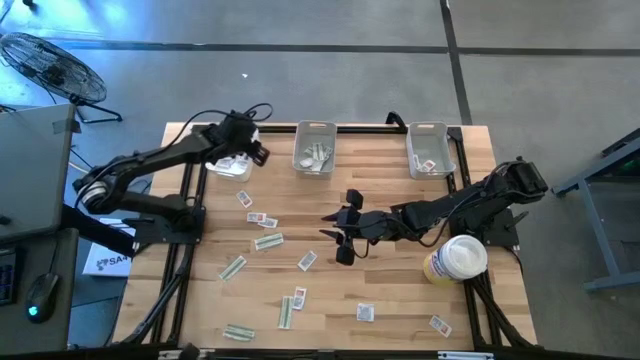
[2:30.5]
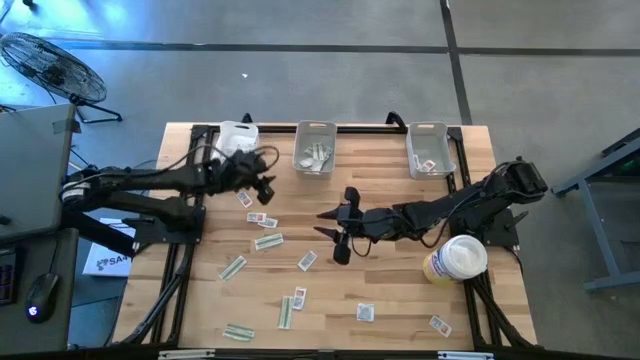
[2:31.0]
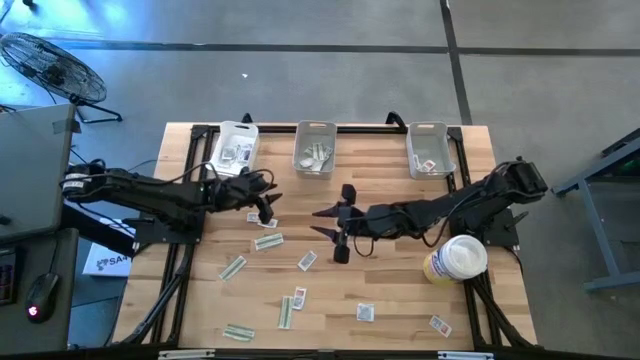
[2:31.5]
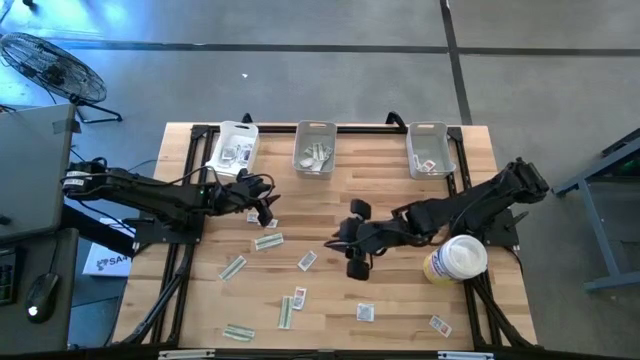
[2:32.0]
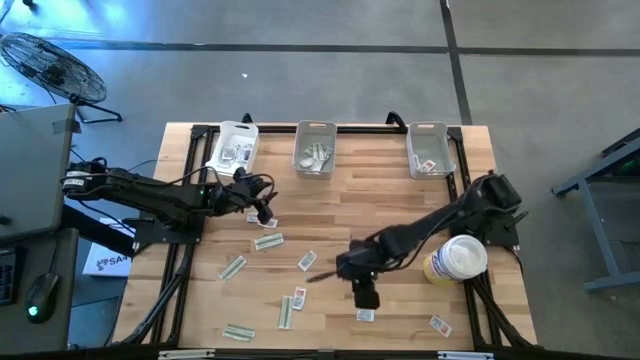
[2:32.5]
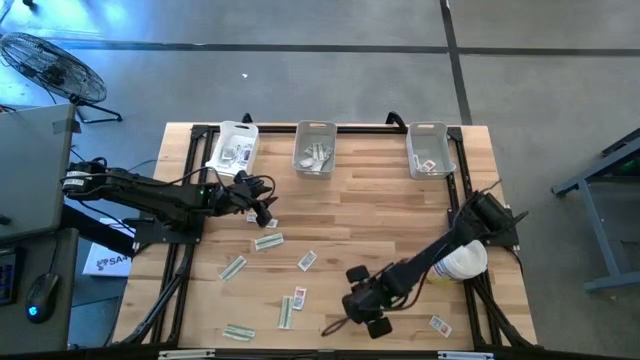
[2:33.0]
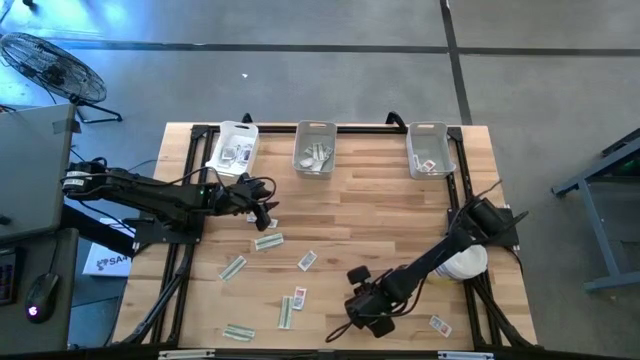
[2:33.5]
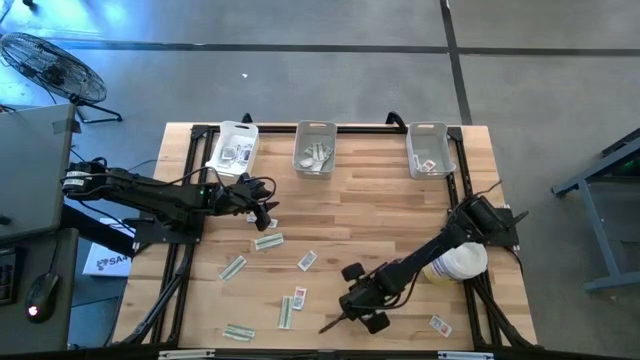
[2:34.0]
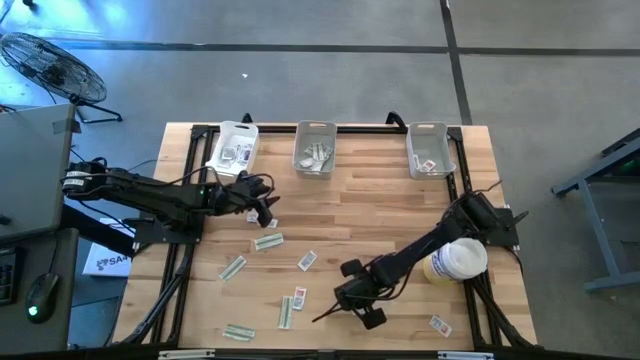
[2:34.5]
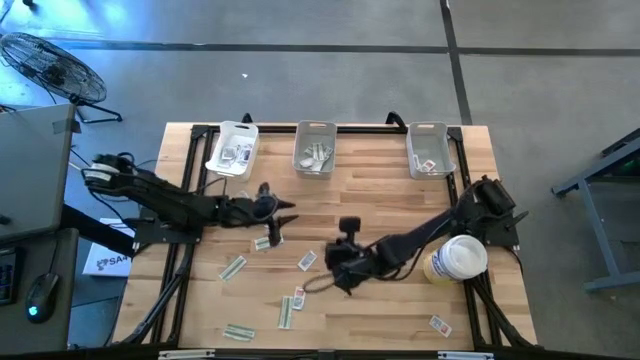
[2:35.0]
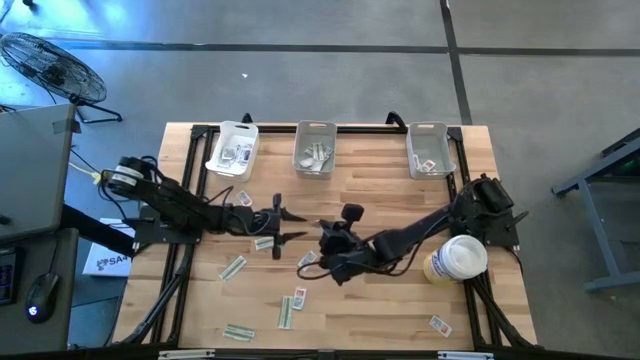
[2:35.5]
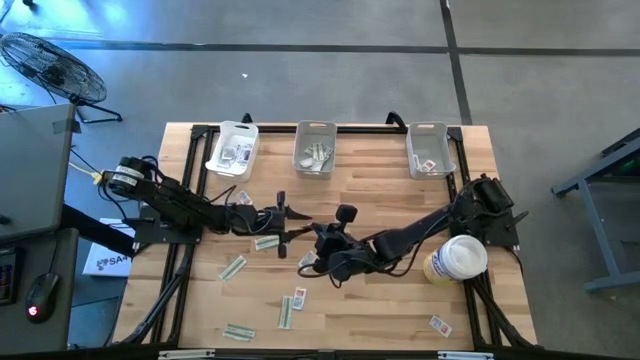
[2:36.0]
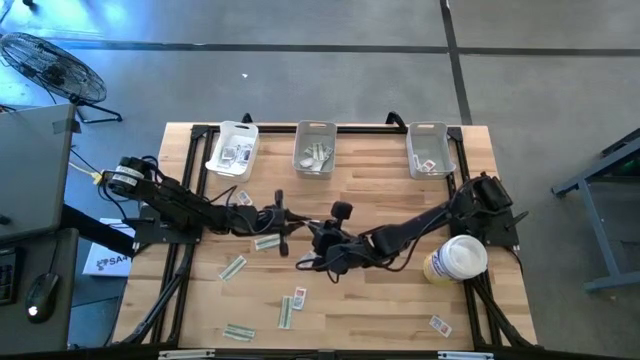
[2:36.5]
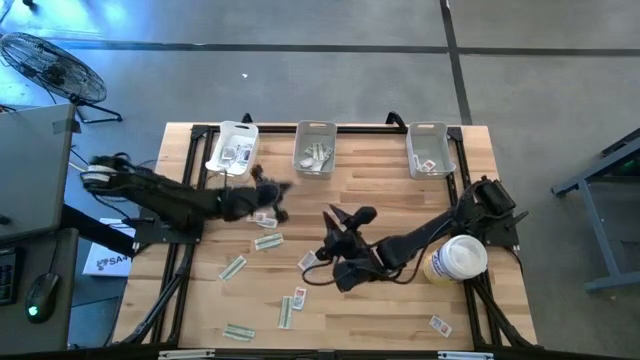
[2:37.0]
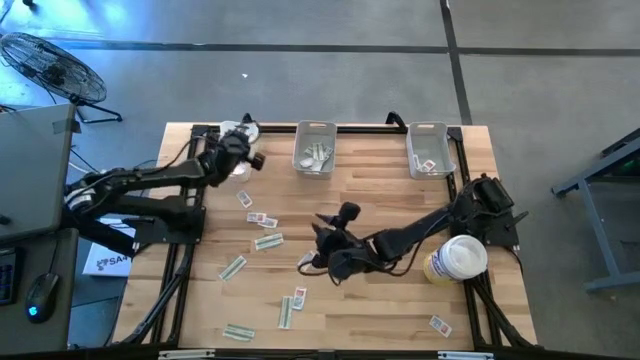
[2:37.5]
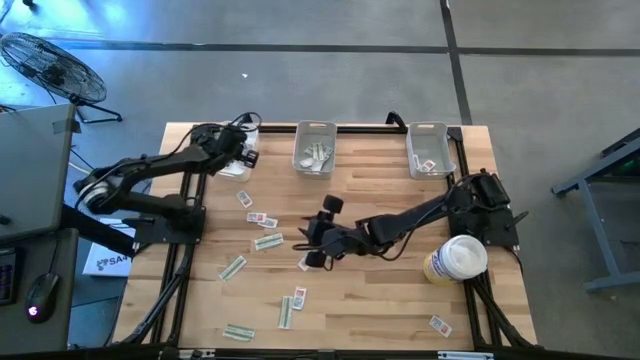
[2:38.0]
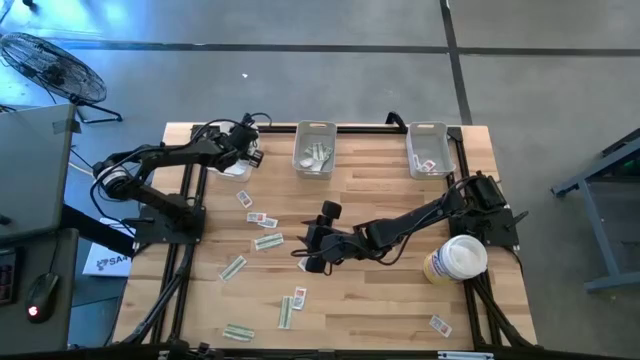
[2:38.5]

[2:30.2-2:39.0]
Task: Pick & Place First Aid Supplies
Put the blue pad into the white bin

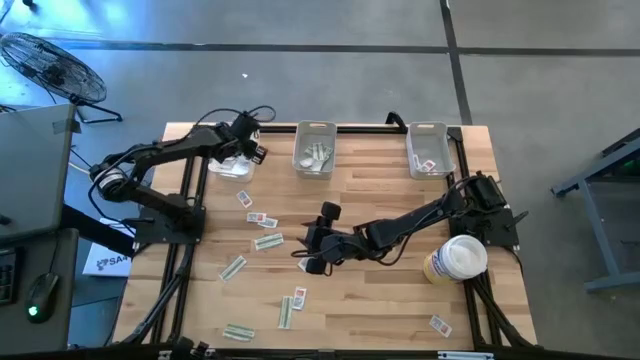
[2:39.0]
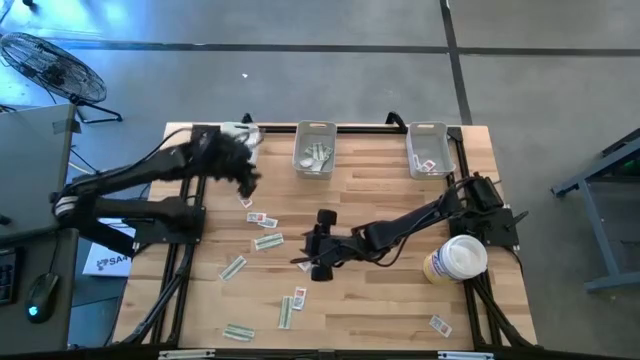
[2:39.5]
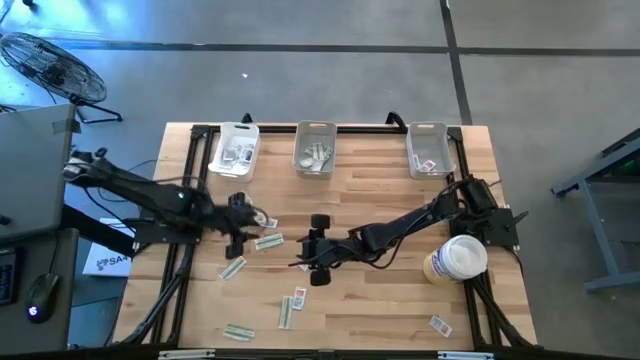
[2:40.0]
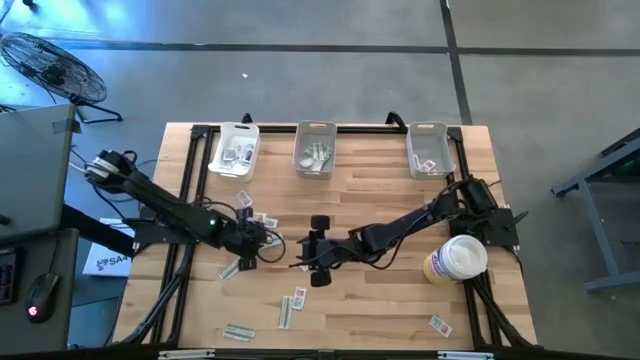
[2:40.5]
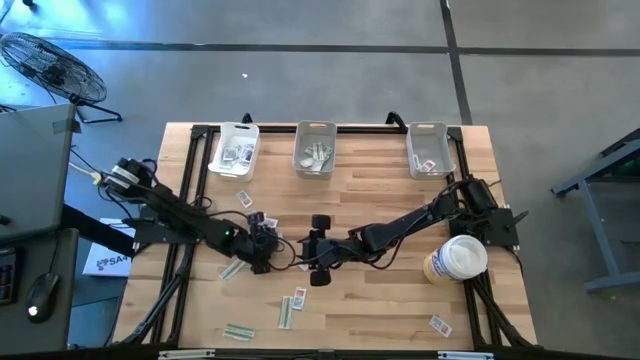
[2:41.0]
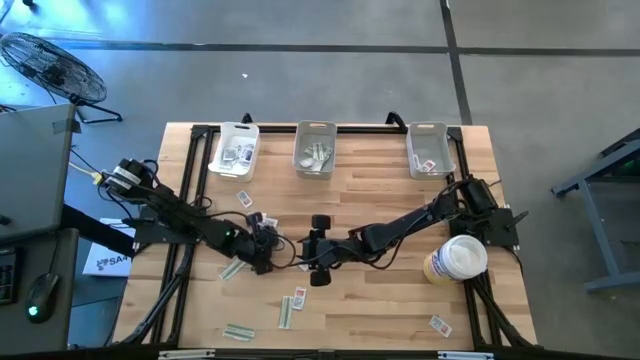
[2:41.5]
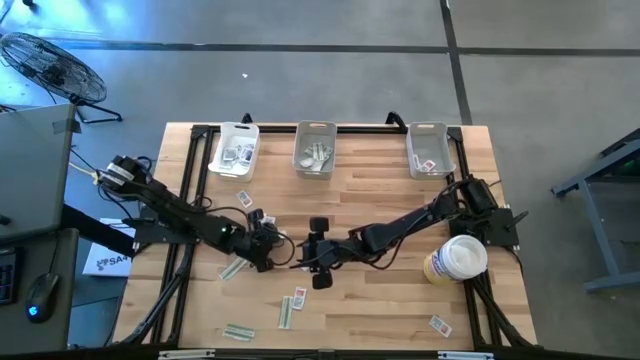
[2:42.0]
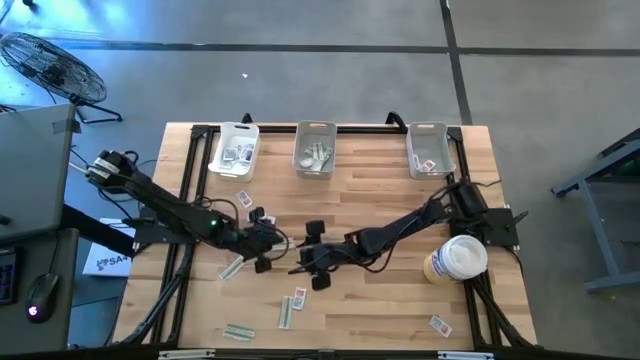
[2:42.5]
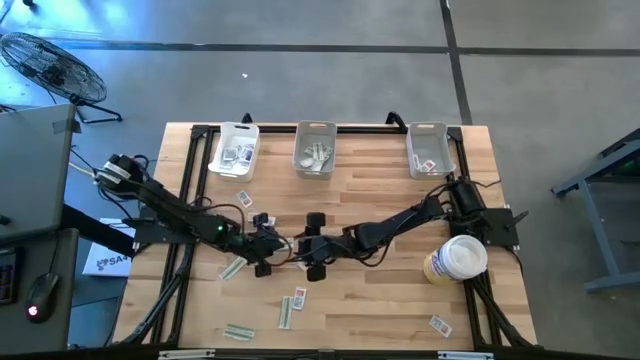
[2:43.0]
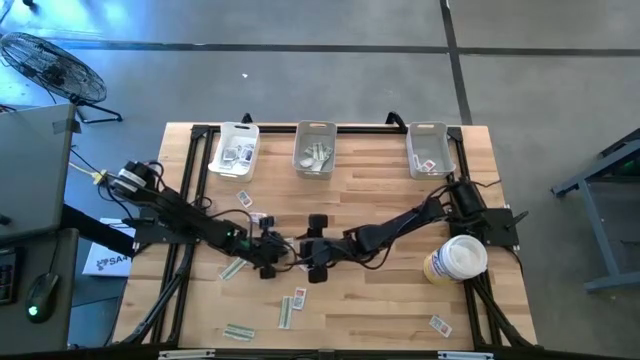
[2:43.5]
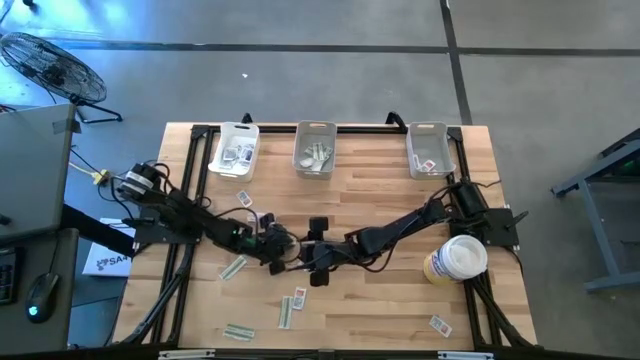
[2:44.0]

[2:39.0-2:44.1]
Put the green pad into the left gray bin

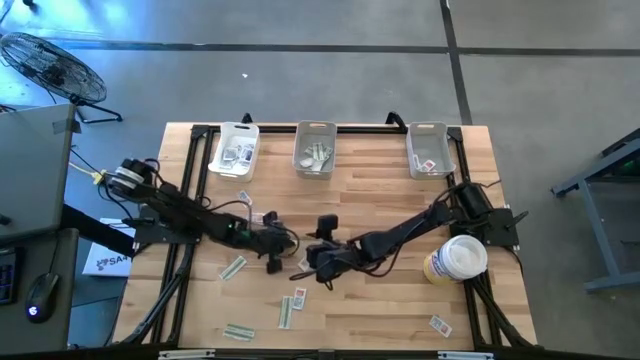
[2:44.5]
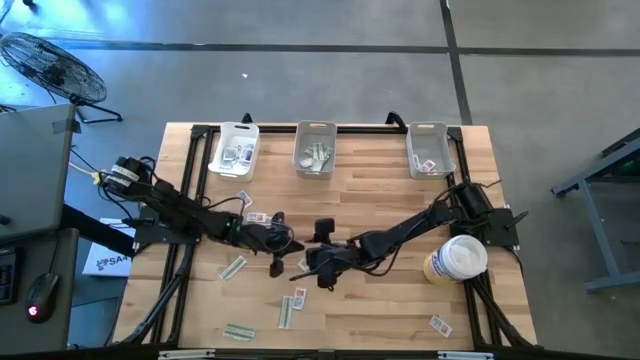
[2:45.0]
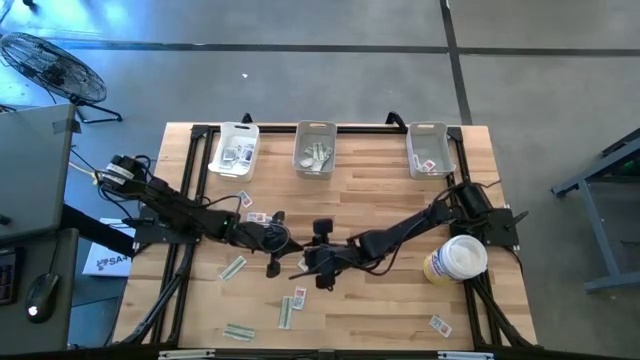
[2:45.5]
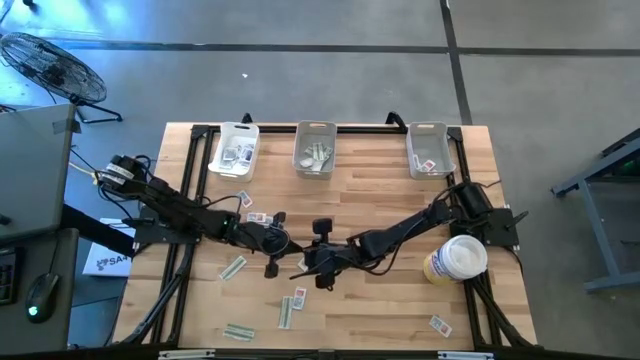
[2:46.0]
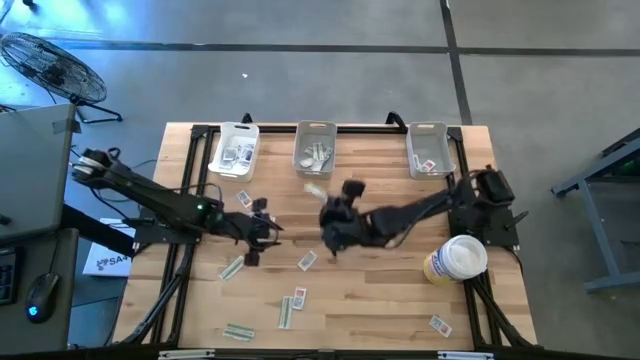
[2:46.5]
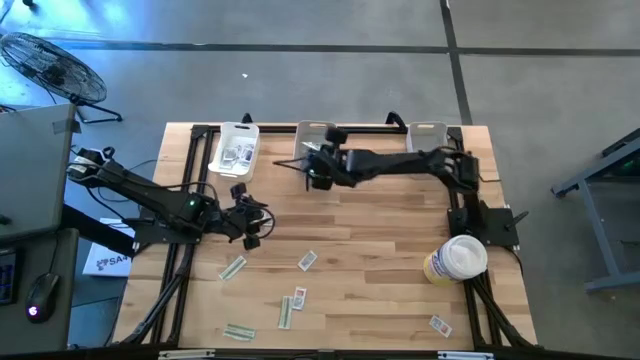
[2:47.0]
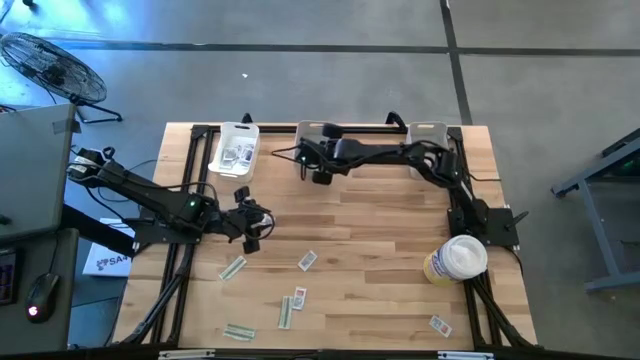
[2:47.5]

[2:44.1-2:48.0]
Put the green pad into the left gray bin

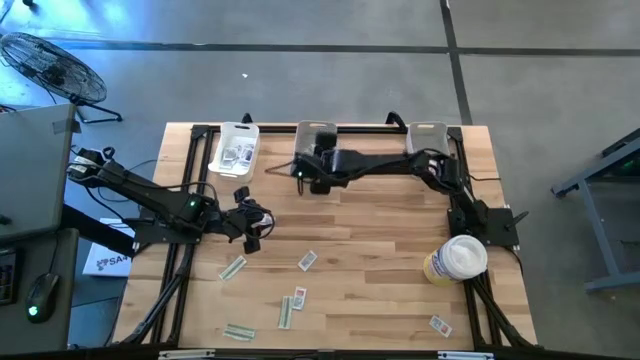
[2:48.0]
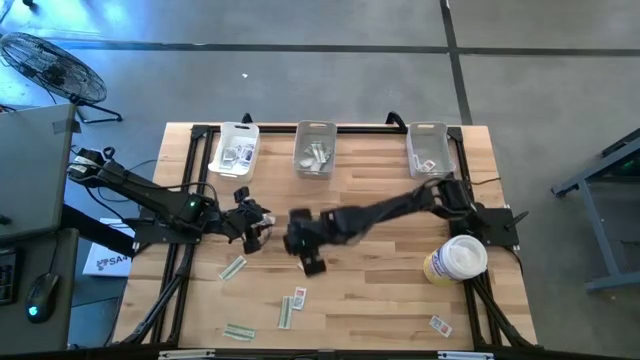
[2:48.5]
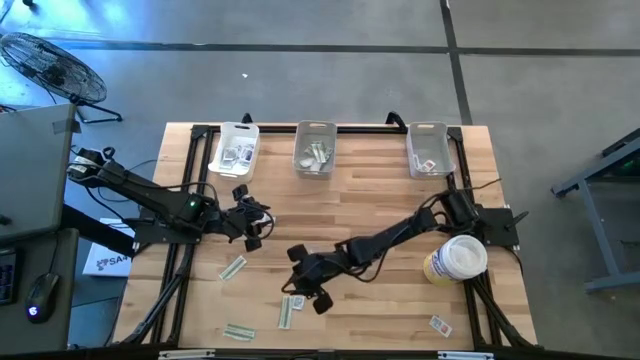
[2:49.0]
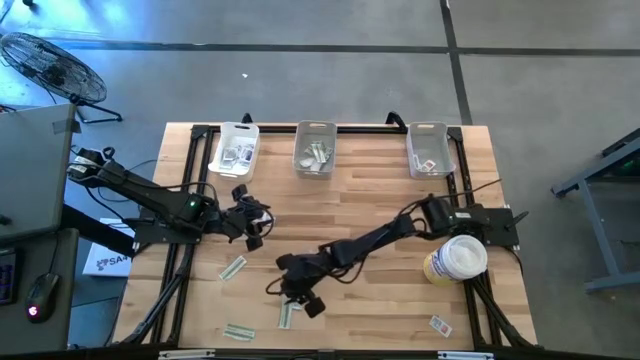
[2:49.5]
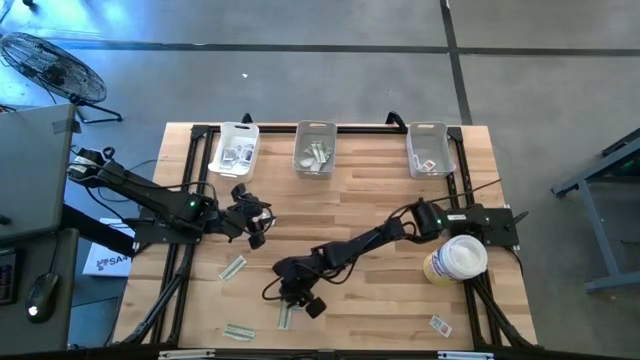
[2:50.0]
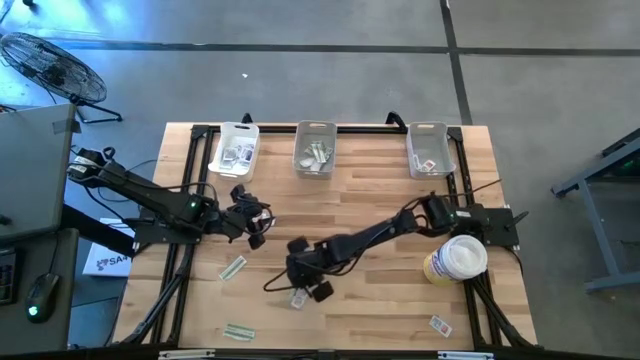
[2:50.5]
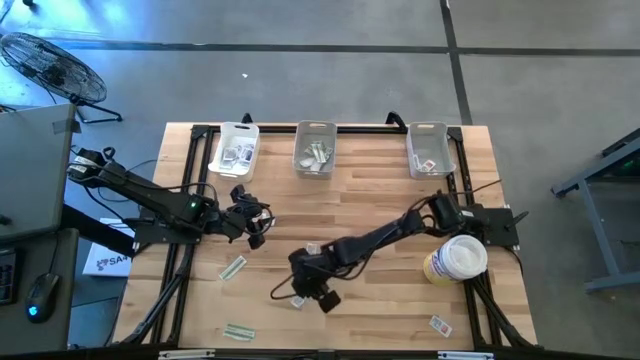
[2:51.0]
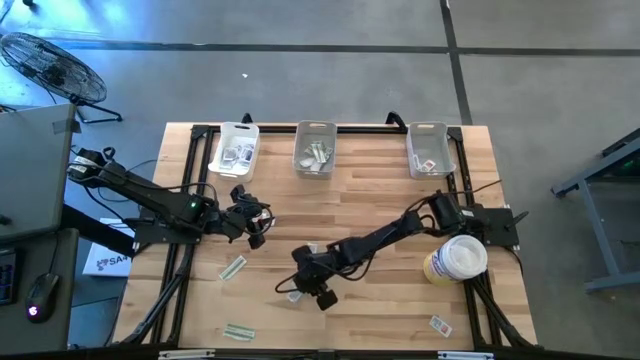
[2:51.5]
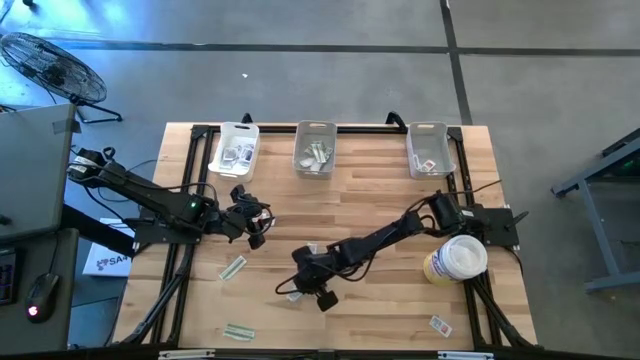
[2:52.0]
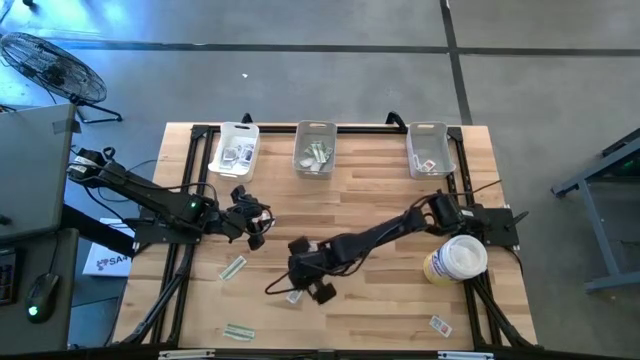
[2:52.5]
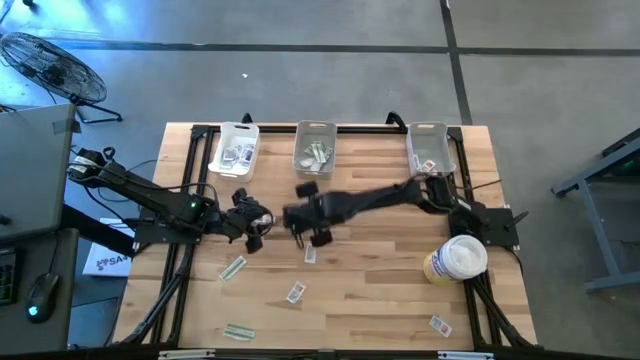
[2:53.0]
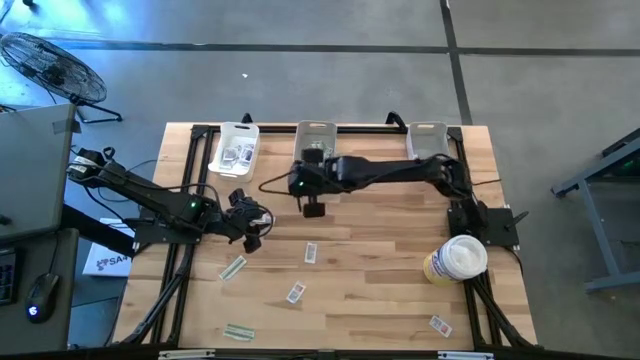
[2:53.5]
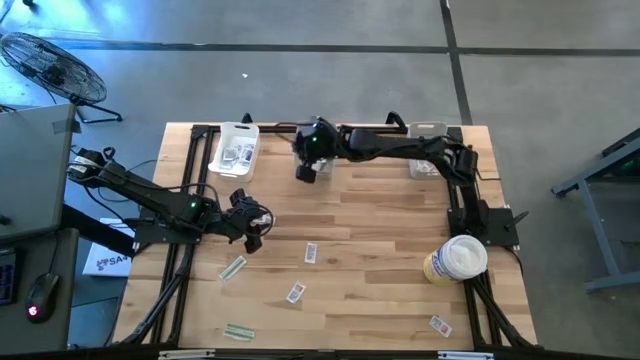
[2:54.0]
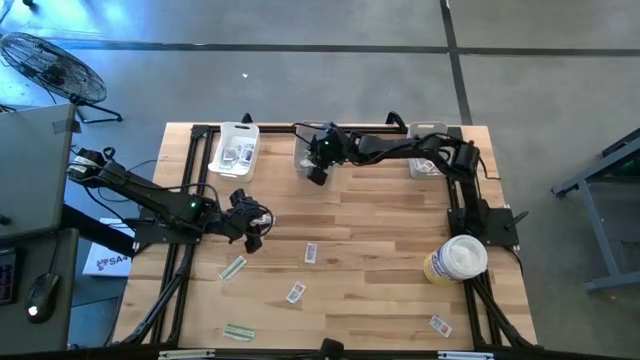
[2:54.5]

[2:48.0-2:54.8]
Put the green pad into the left gray bin
